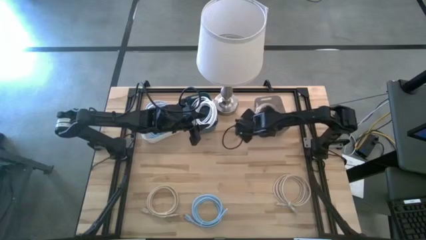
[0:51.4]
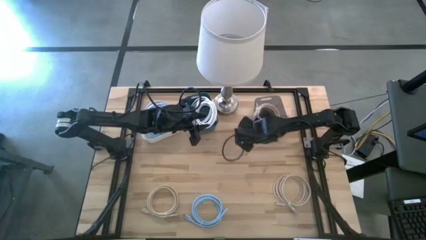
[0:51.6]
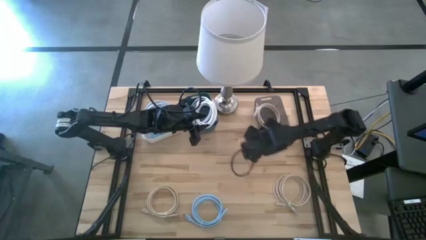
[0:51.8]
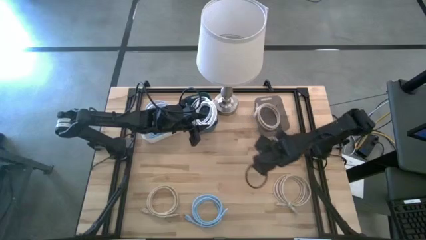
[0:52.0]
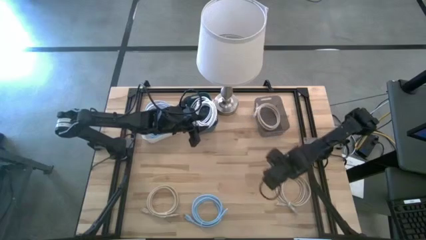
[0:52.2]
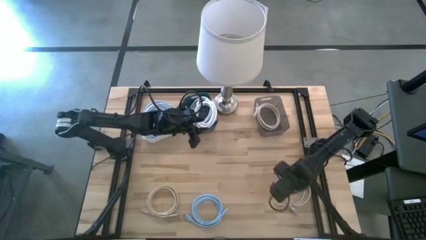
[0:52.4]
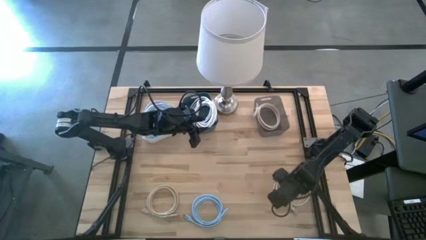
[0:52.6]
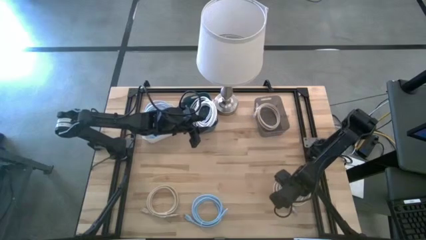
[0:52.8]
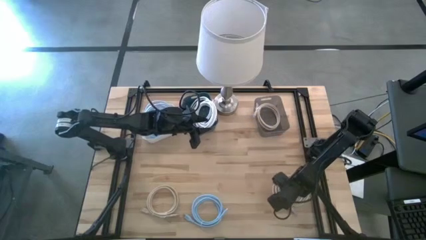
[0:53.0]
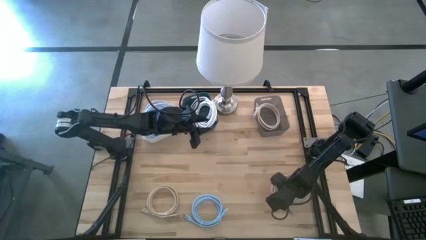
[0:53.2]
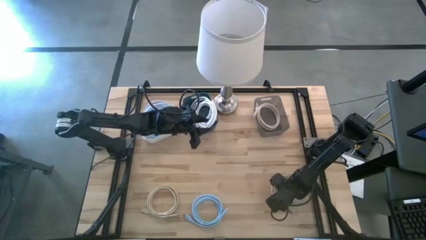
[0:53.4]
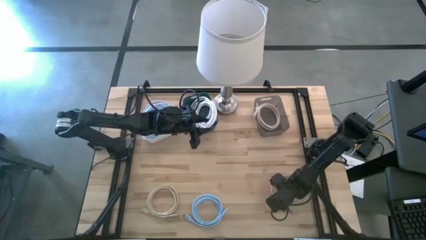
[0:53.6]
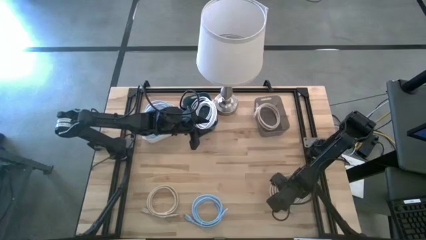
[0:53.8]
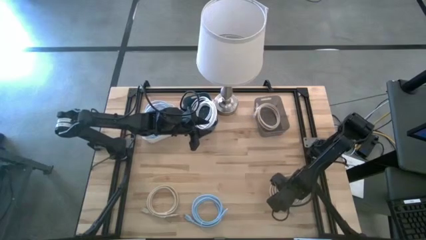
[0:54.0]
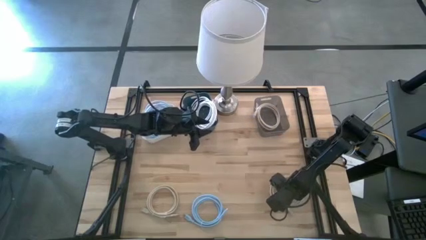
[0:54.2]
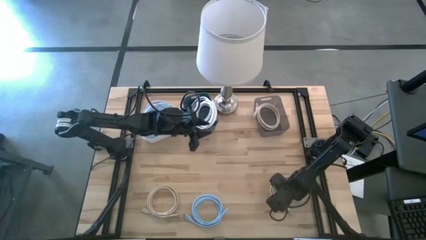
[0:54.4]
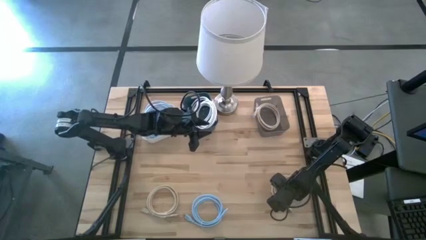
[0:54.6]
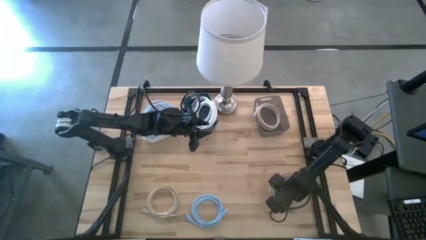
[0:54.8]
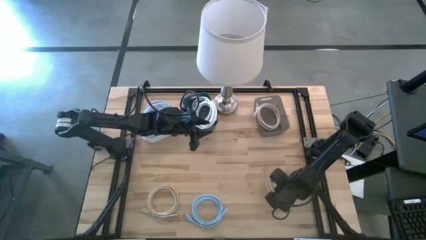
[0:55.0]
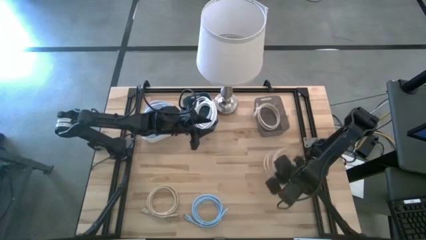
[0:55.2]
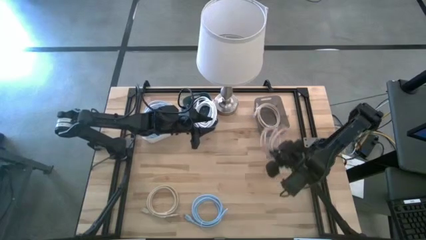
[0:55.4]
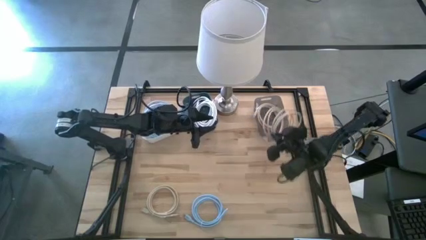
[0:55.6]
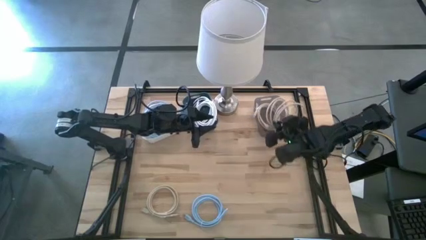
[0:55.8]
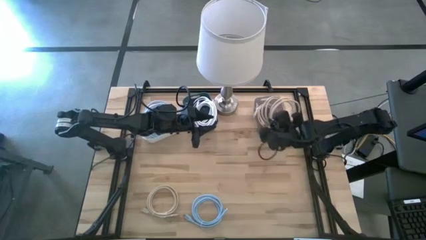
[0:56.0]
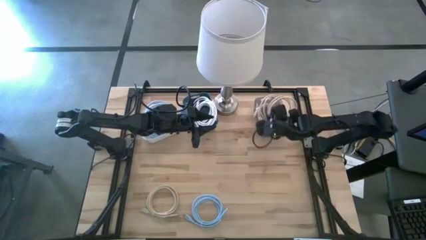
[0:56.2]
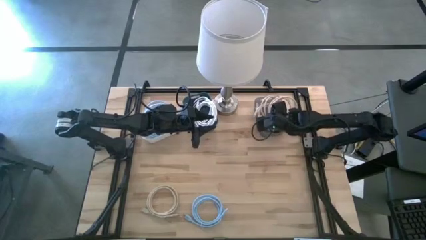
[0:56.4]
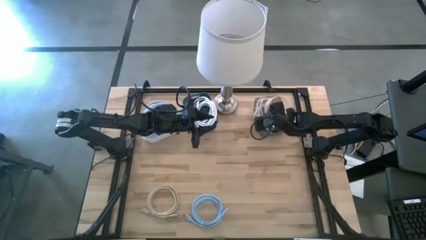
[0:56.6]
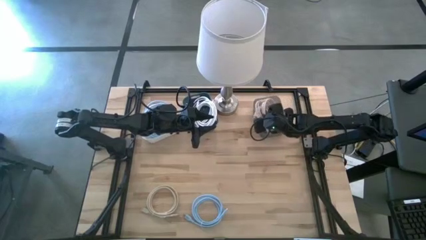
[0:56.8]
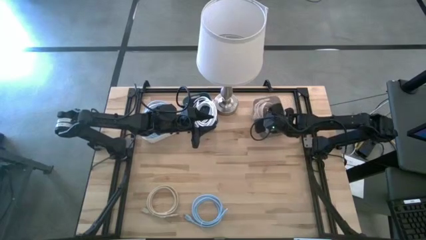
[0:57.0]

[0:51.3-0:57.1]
Task: Pick & Place USB Port
Put the right brown charger cable into the black bin

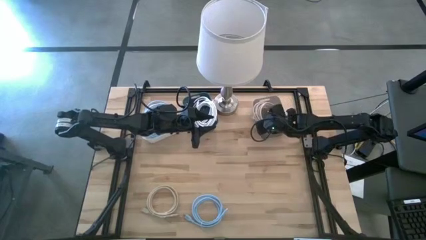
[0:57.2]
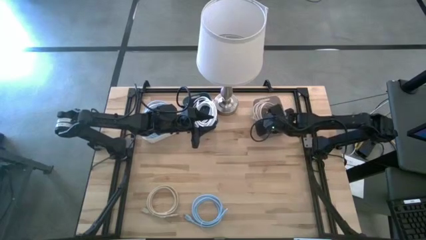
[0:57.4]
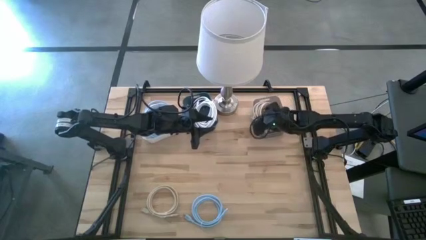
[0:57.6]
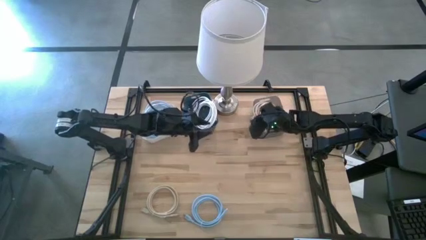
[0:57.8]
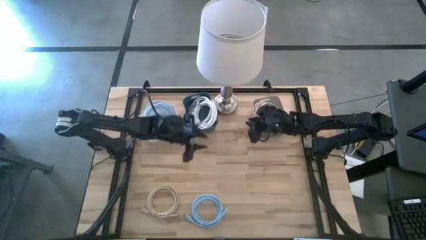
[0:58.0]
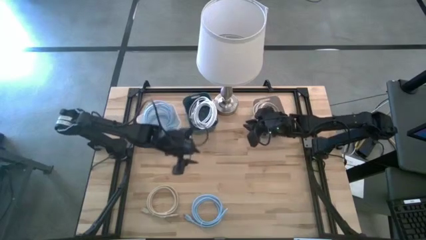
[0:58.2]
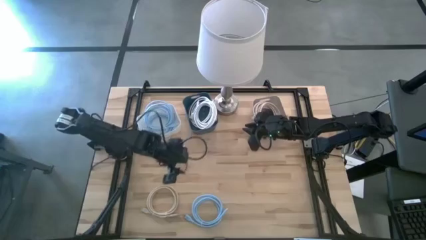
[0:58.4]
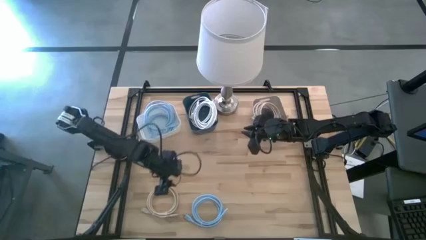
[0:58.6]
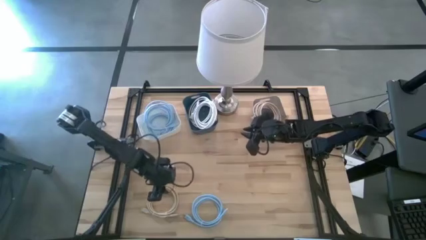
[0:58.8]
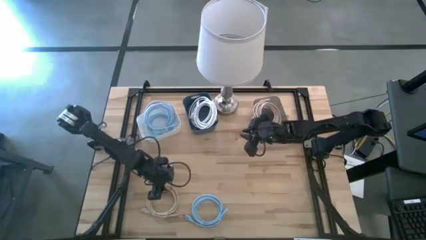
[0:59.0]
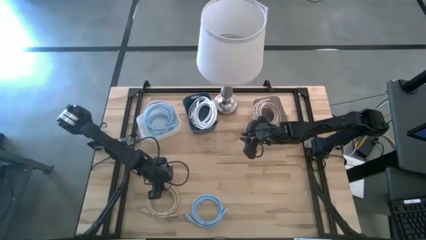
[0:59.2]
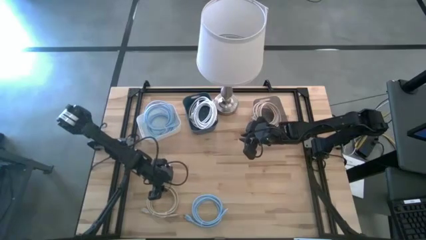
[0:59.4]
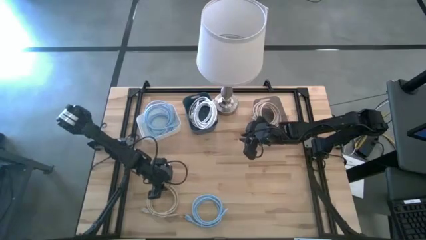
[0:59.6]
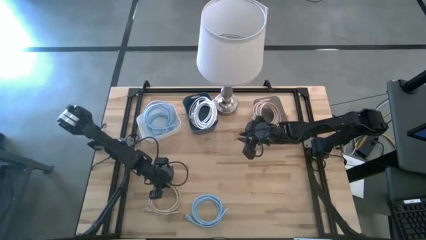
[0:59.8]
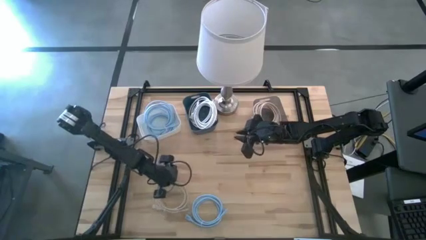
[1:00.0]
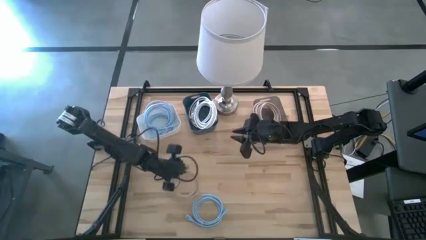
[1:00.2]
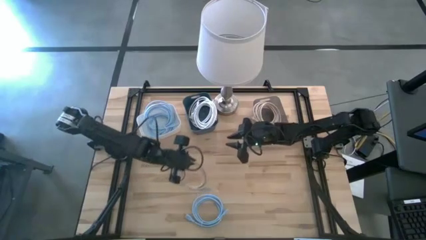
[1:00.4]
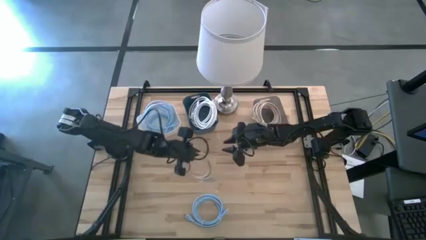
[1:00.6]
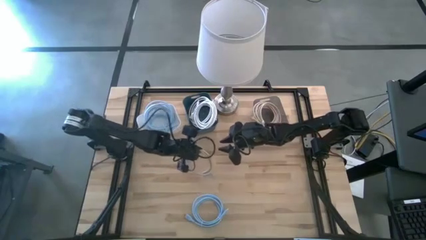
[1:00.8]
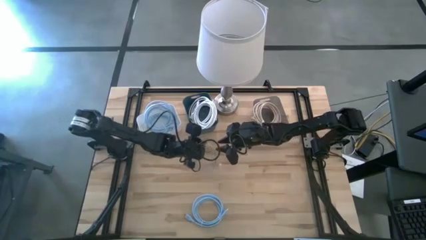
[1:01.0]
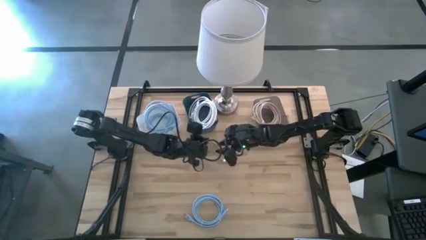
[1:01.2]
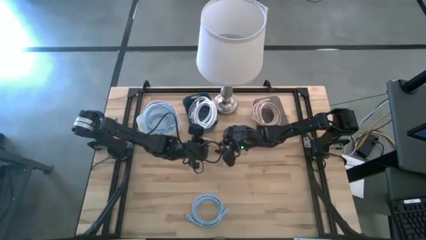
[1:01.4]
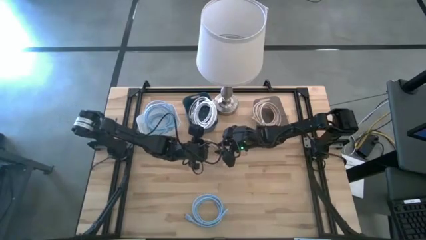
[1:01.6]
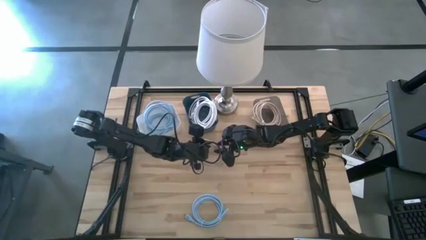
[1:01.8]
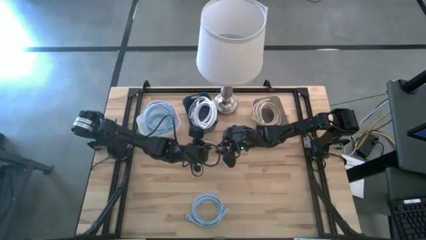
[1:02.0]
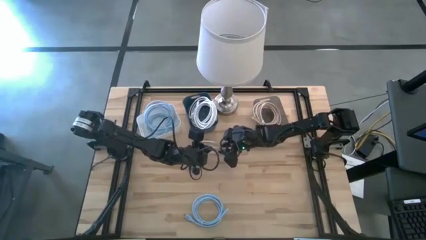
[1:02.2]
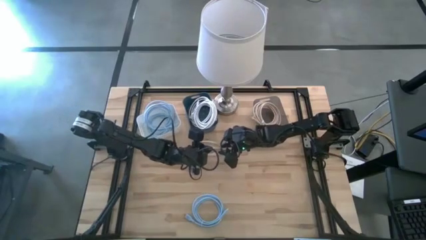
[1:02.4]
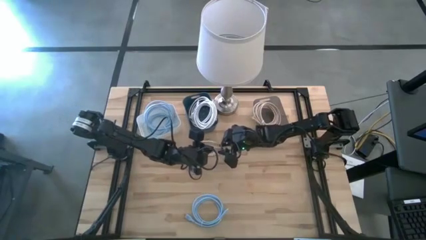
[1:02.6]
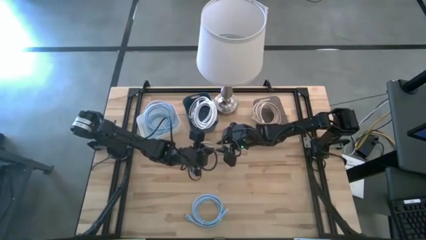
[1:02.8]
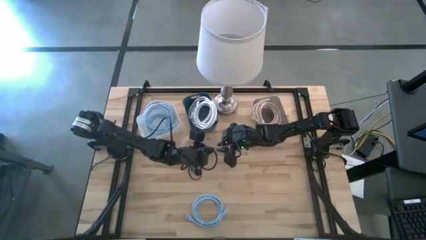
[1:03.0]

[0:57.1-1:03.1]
Put the brown charger cable into the black bin

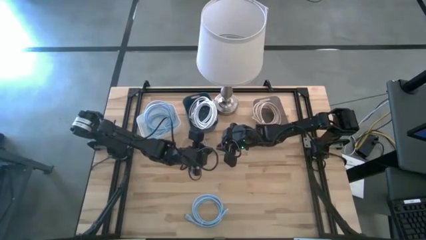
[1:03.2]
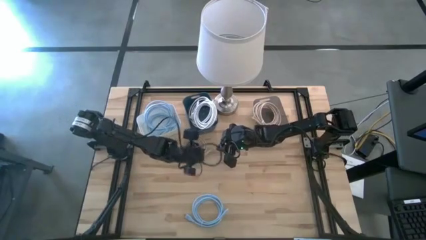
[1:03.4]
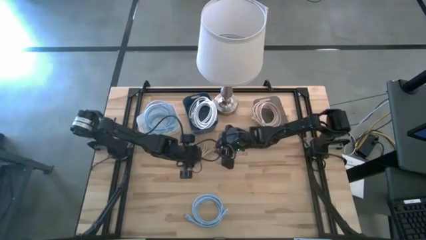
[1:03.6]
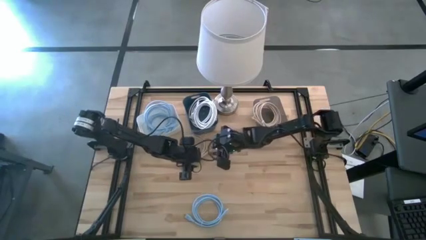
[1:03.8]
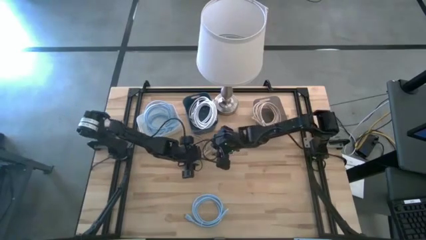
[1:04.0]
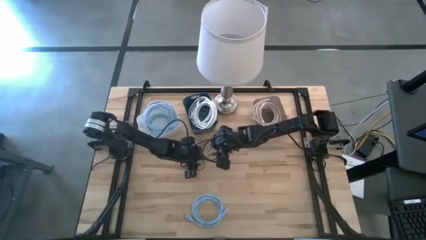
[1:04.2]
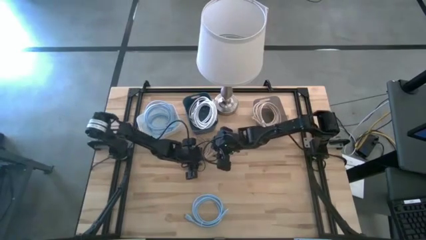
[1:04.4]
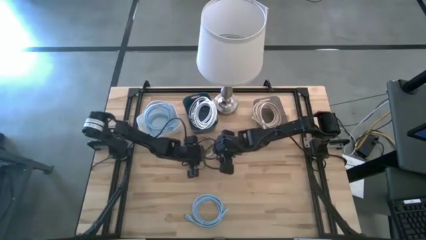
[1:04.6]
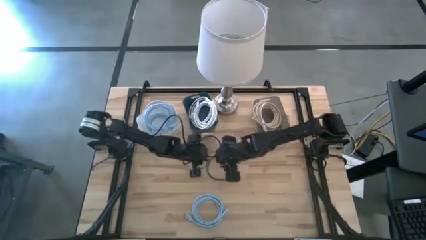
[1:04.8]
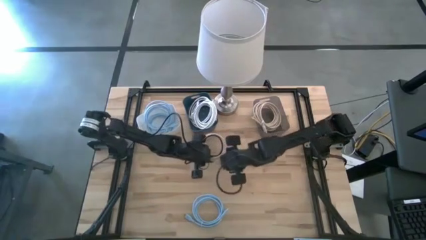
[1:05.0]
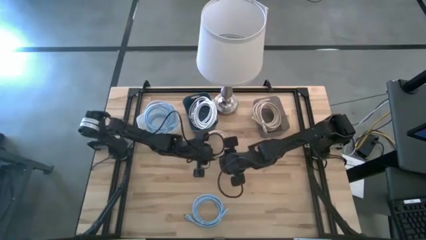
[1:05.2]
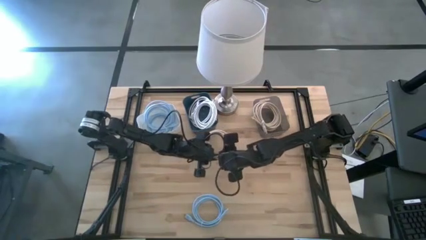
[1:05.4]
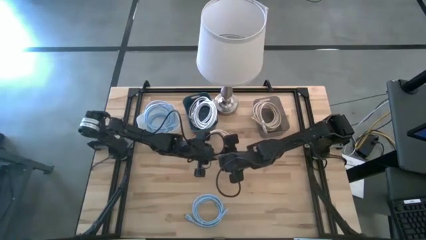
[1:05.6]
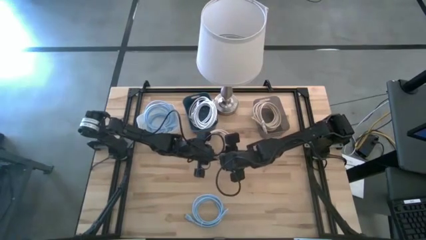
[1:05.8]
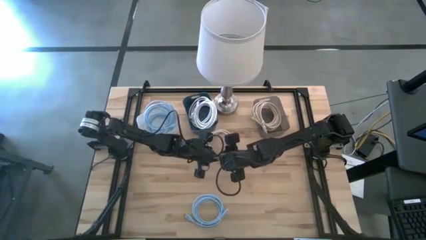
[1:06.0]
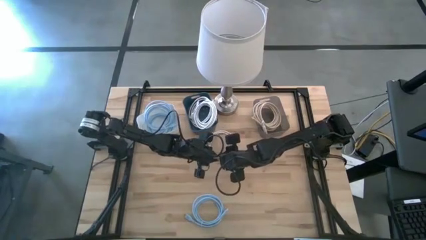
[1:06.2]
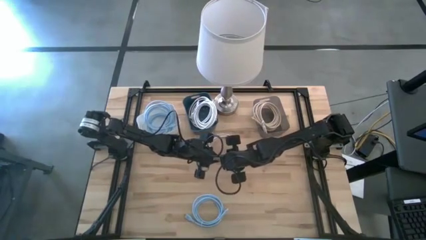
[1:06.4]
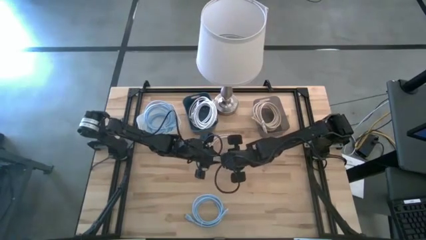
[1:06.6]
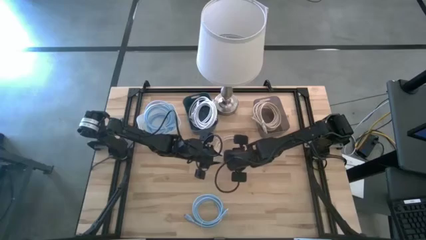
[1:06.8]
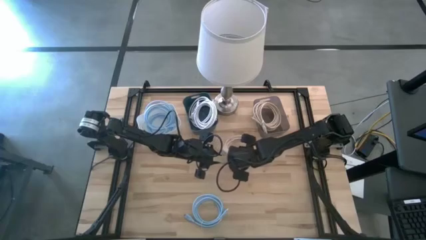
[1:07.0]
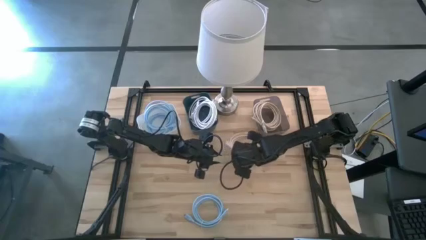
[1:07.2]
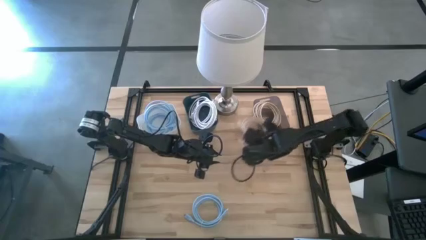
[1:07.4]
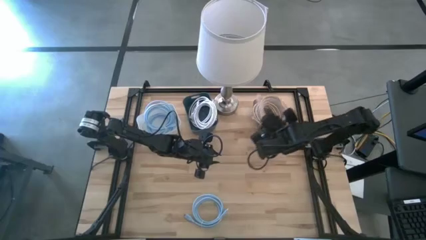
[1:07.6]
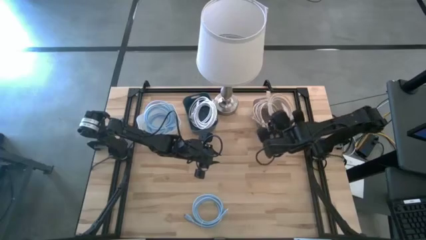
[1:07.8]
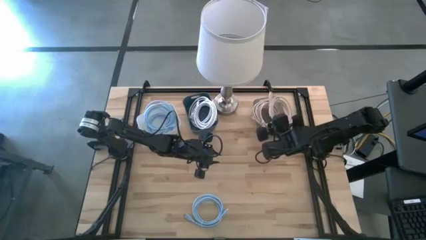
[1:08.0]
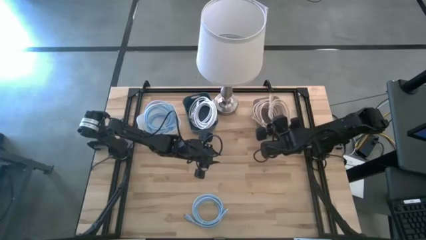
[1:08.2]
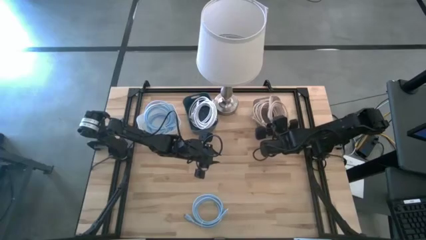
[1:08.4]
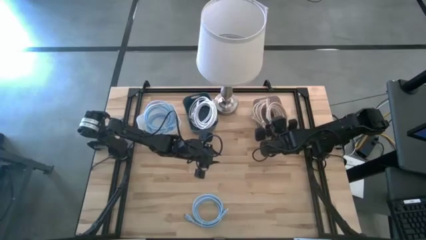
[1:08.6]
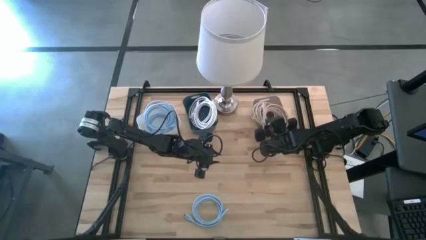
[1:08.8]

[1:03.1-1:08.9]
Put the brown charger cable into the black bin
